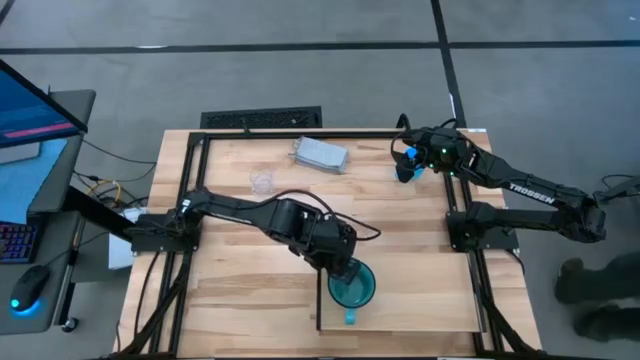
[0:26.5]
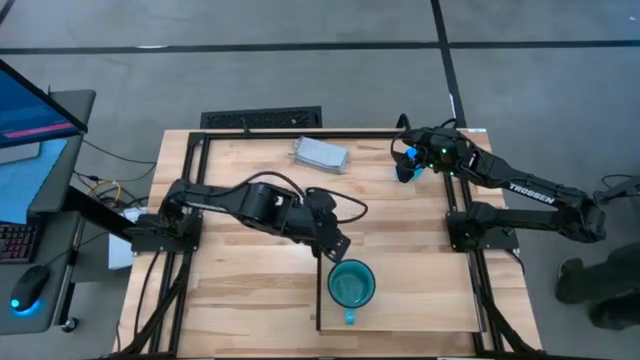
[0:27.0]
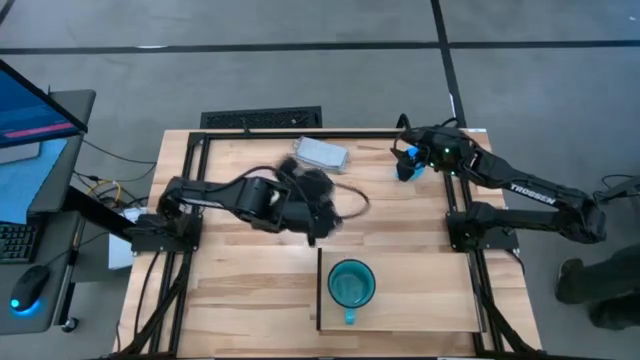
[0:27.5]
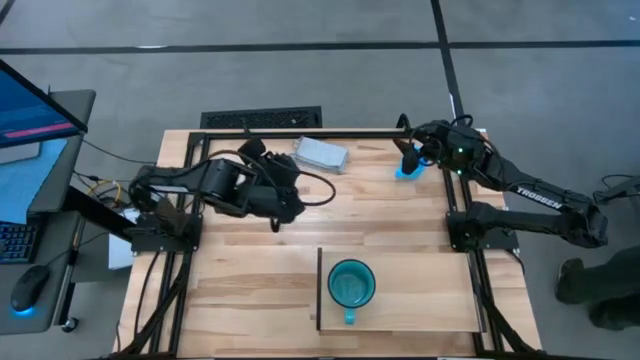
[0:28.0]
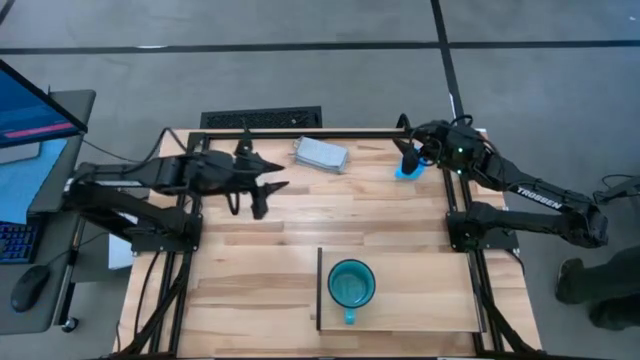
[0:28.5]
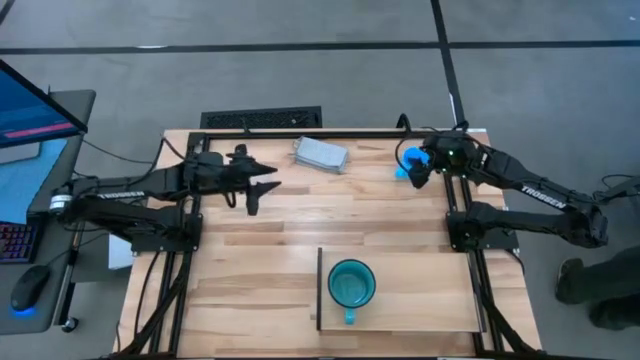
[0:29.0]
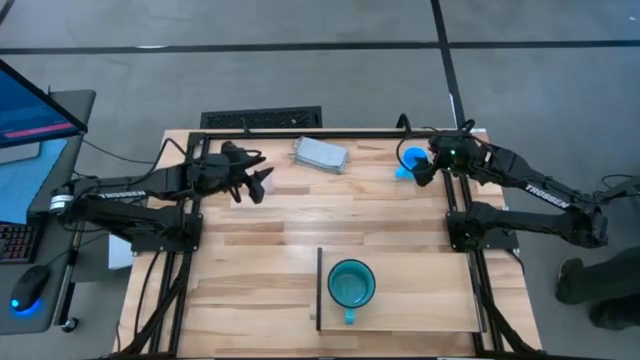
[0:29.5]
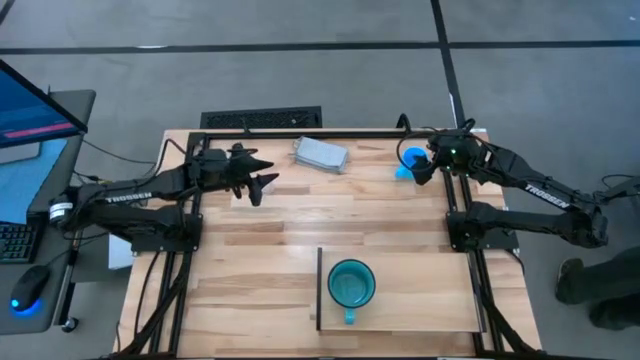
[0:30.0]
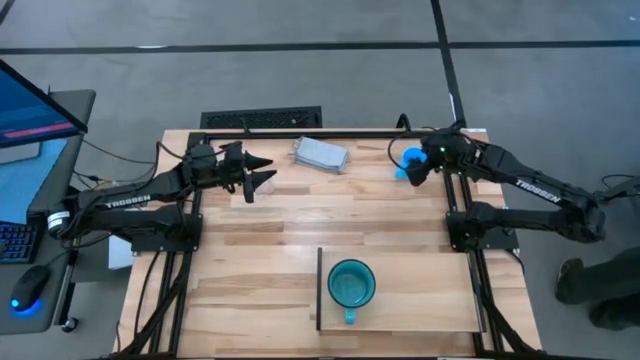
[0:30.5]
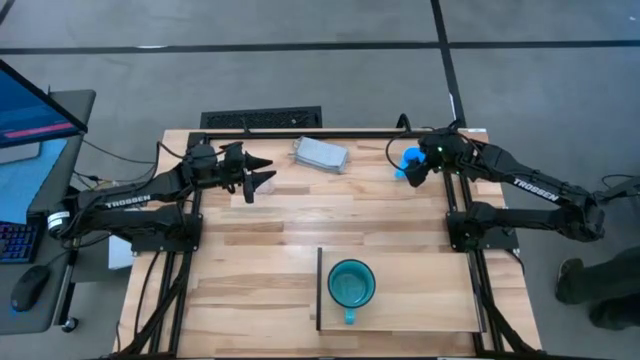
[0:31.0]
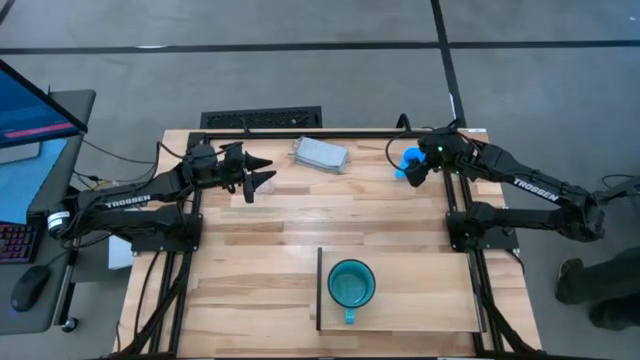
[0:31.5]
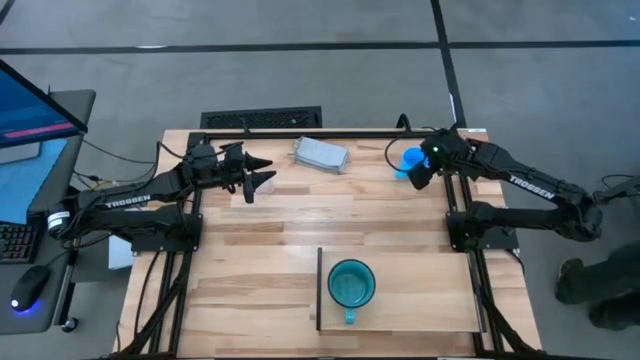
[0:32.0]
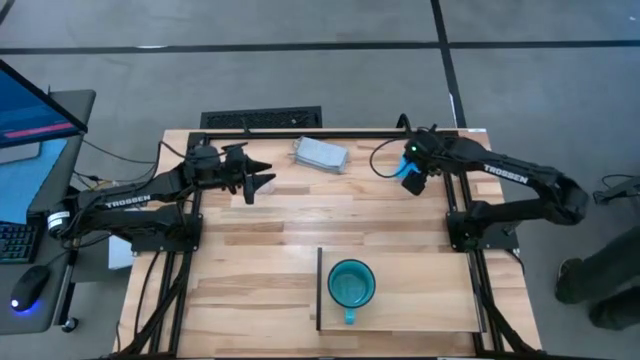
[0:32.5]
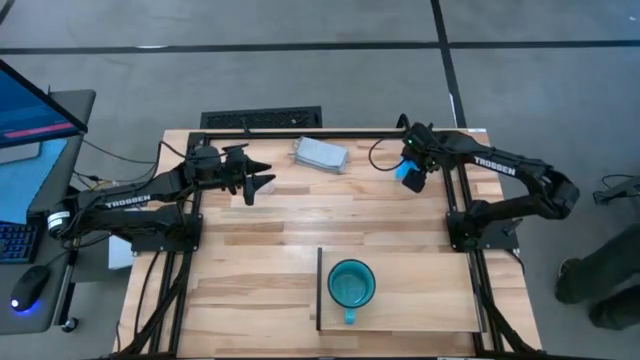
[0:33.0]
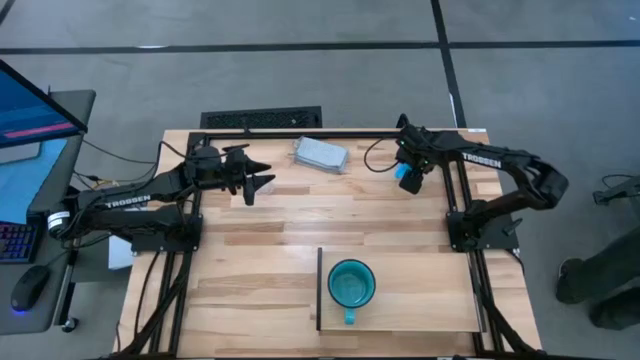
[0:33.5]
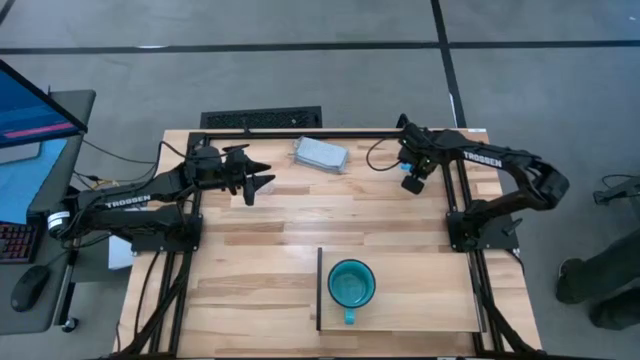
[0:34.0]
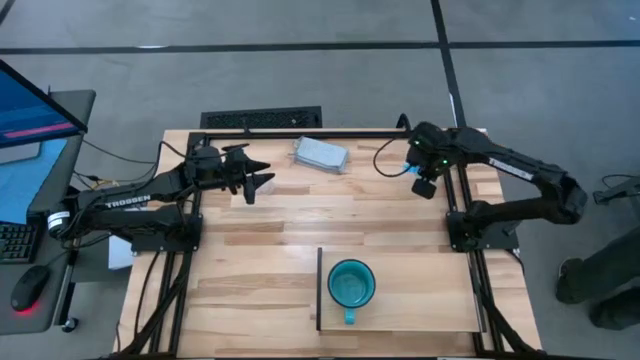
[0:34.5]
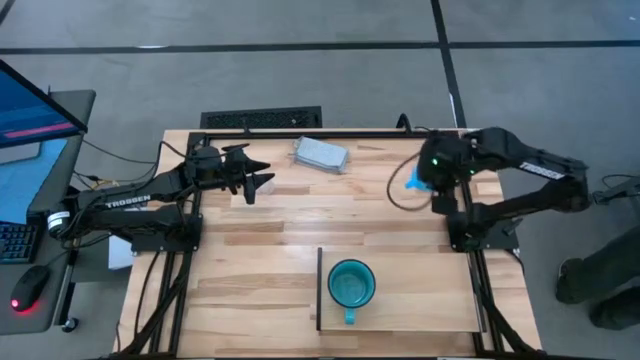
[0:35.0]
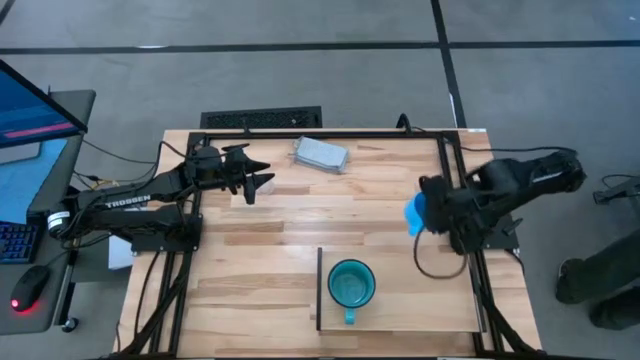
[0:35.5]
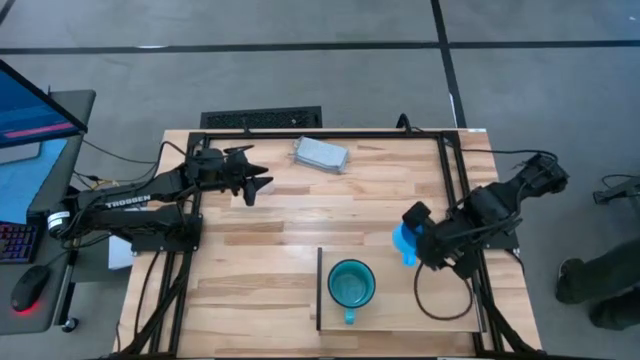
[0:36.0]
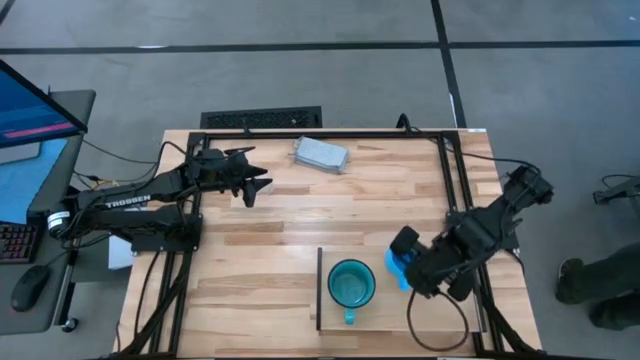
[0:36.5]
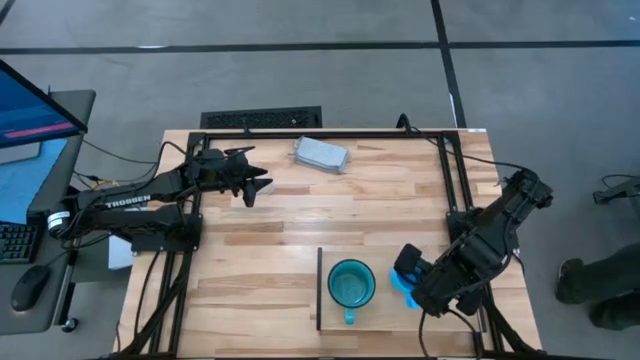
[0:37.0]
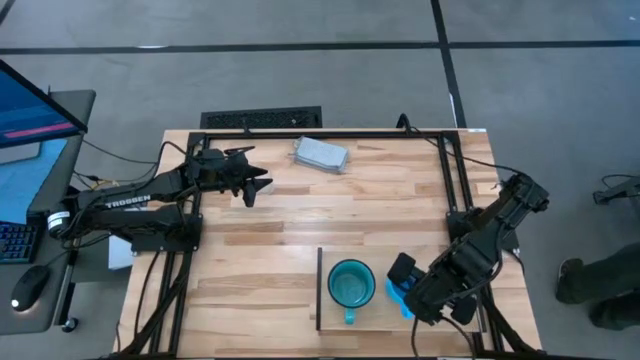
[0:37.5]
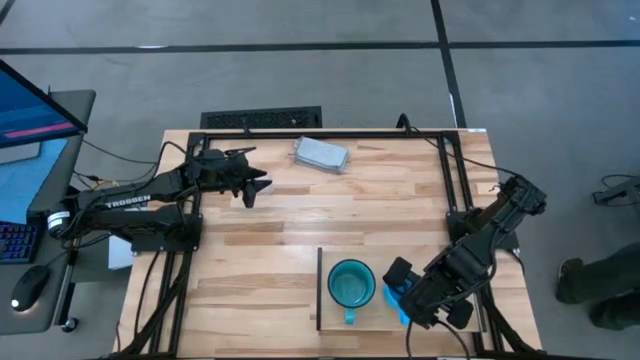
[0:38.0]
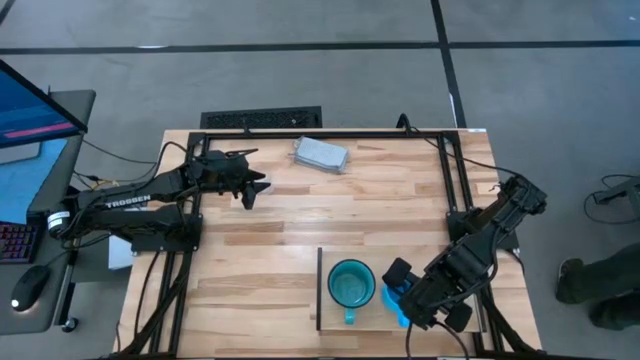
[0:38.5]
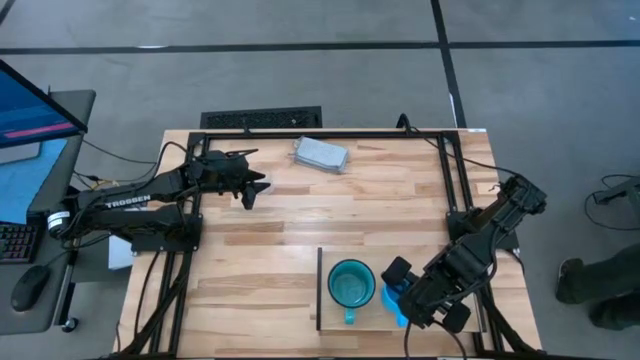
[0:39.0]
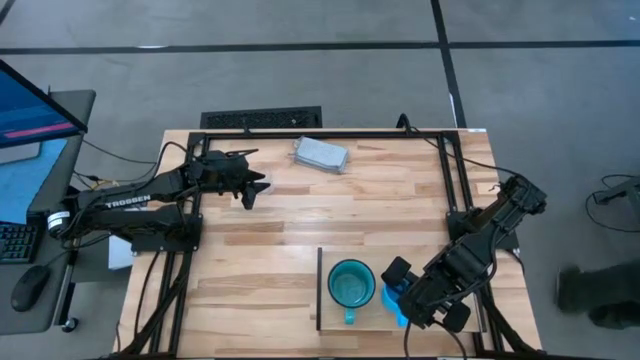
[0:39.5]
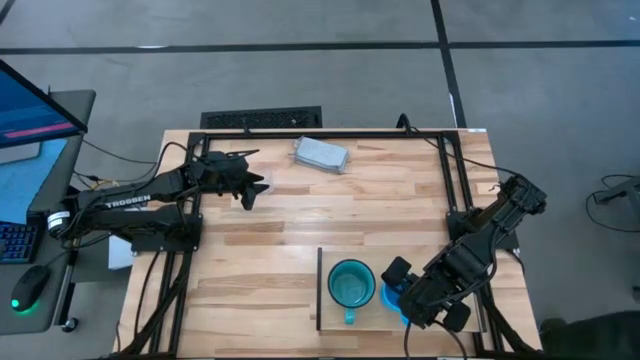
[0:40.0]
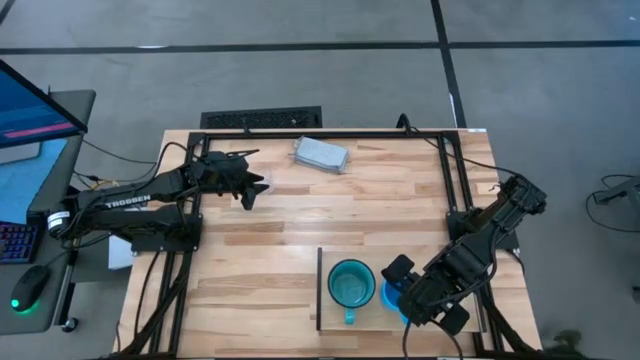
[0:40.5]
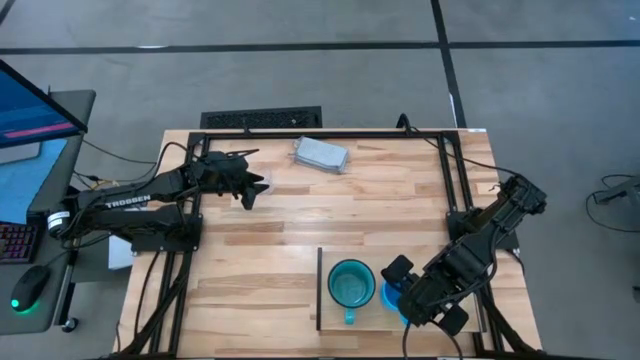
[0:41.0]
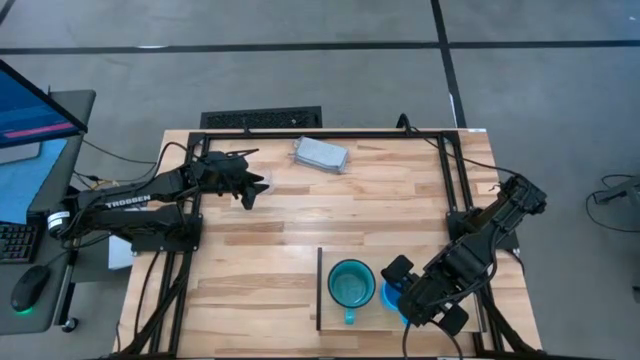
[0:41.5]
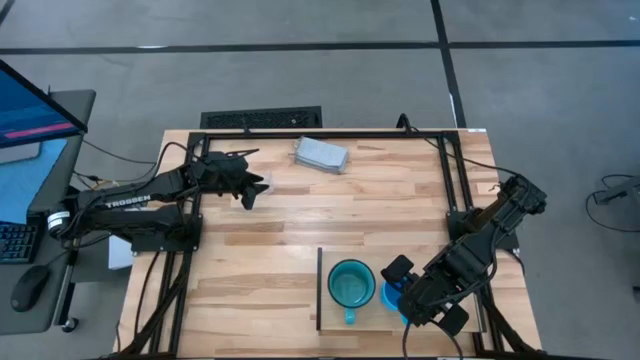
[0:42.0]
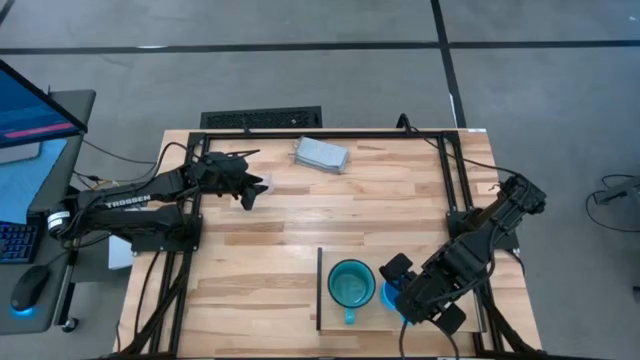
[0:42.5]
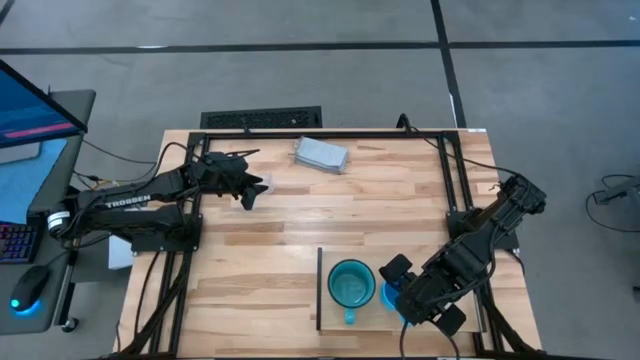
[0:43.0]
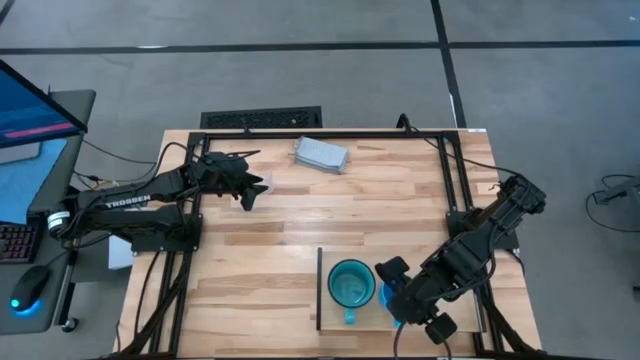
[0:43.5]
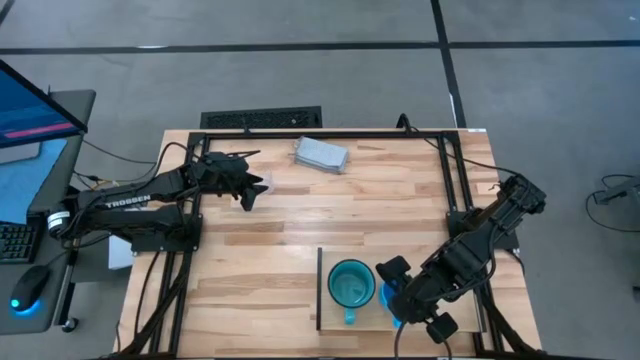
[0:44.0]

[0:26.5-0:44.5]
Task: Stack small to large cups/mugs on shelf
Put the light blue mug on the shelf

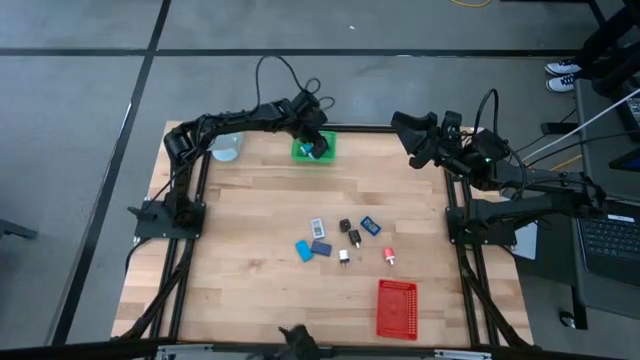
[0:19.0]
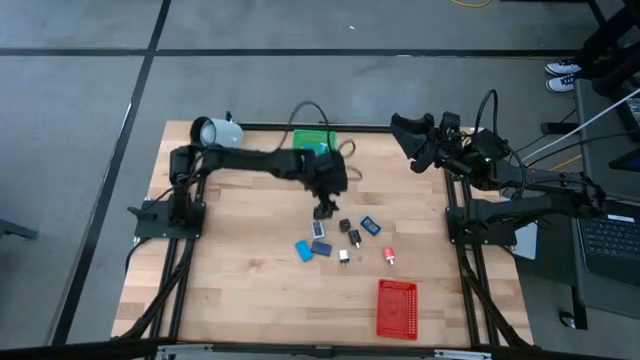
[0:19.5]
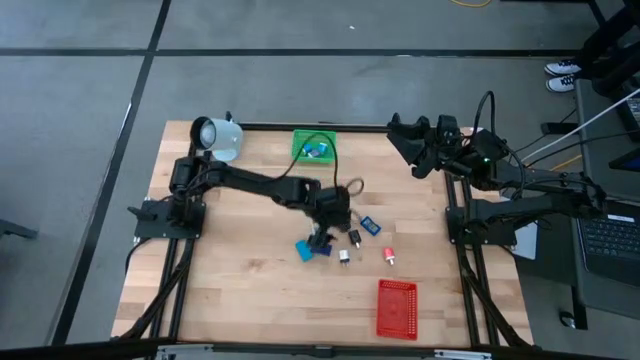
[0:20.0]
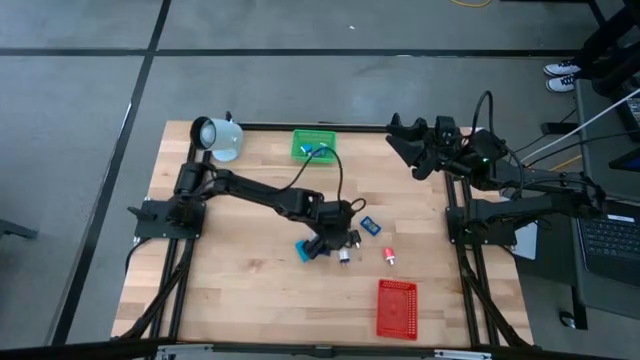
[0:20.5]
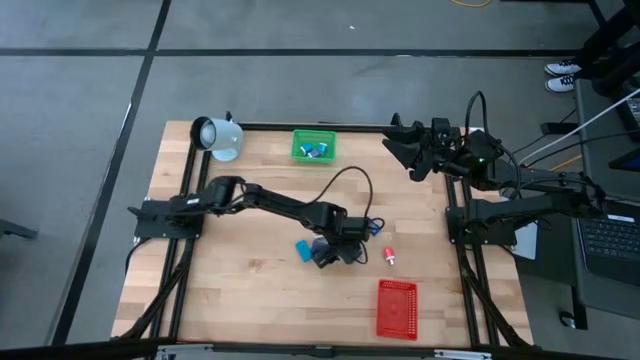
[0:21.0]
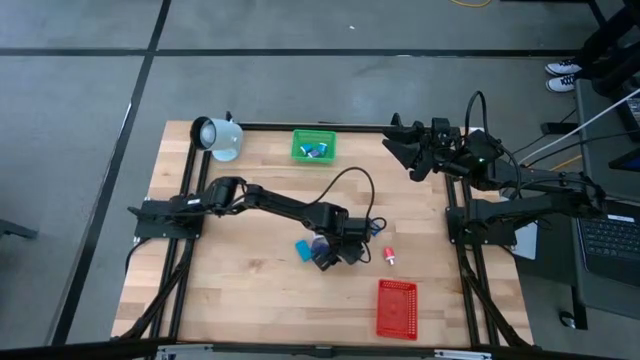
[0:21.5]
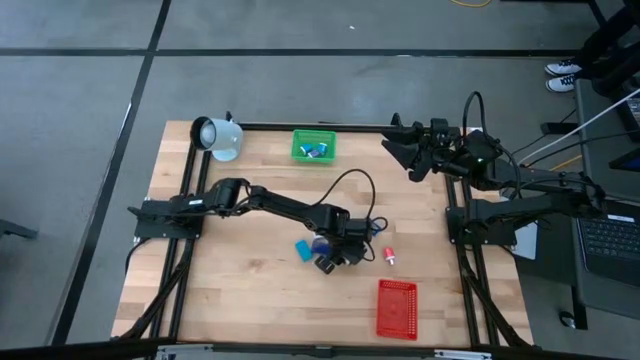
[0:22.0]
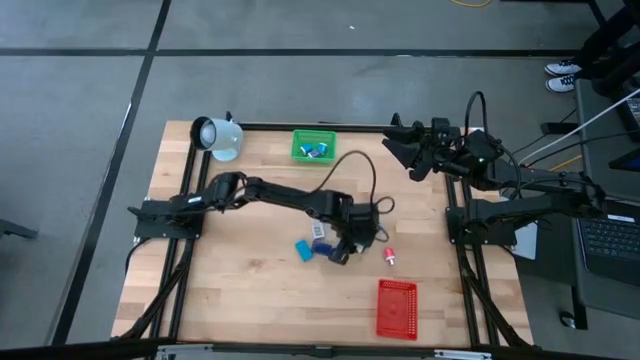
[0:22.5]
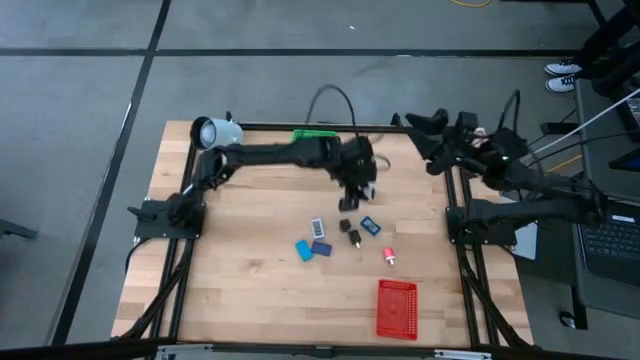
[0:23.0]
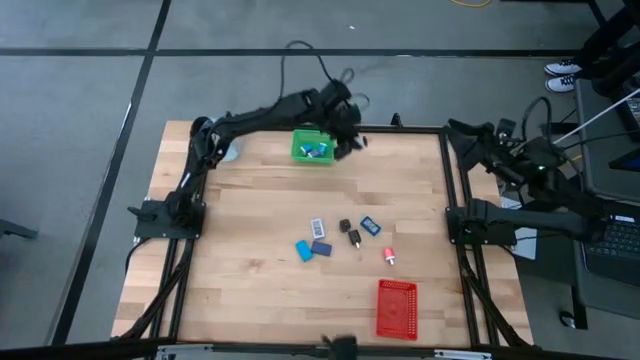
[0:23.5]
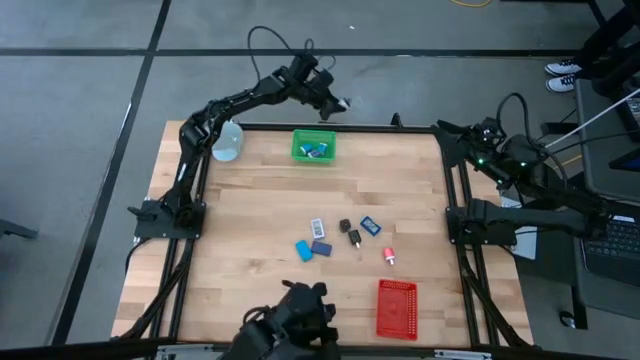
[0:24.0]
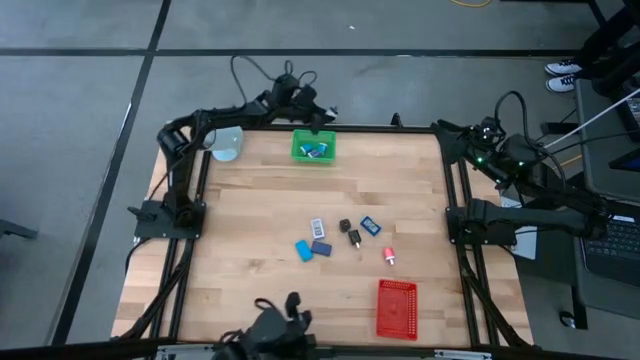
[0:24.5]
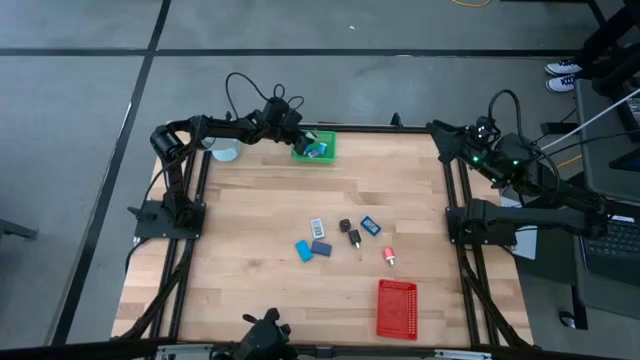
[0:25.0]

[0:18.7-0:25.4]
Task: Pick & Place Office items
Put the white charger adapter into the green bin
